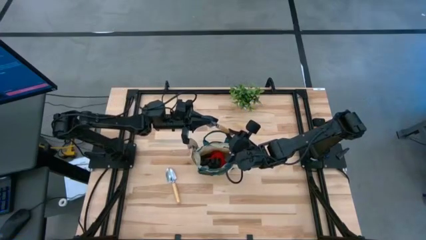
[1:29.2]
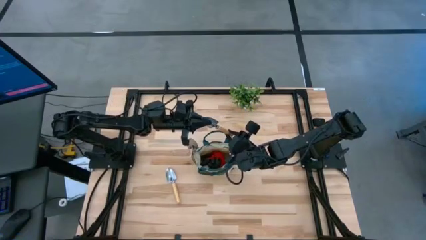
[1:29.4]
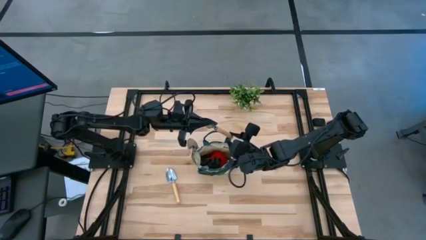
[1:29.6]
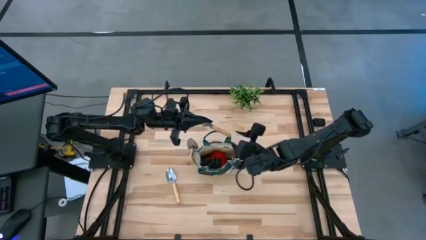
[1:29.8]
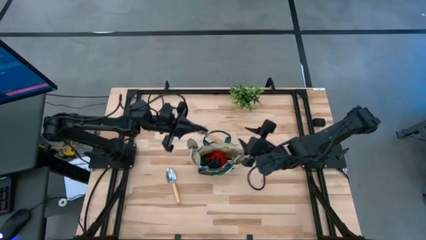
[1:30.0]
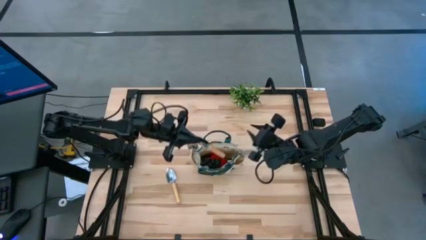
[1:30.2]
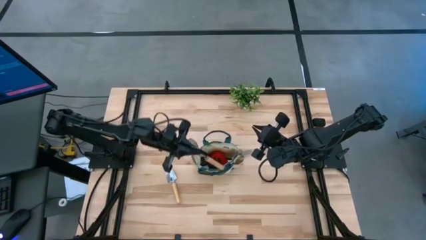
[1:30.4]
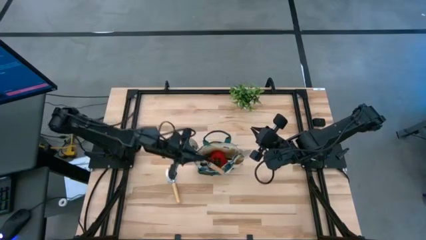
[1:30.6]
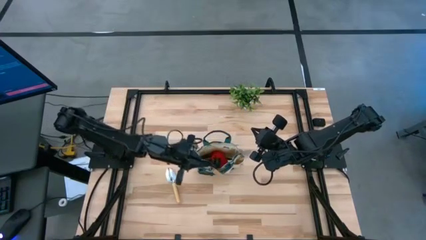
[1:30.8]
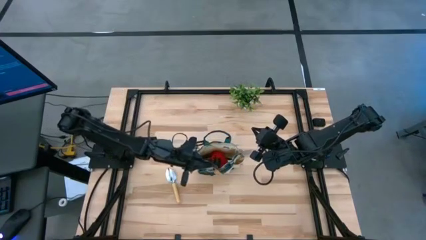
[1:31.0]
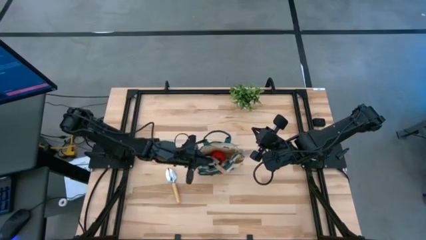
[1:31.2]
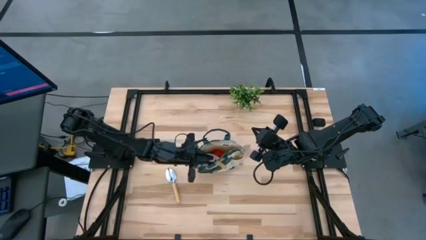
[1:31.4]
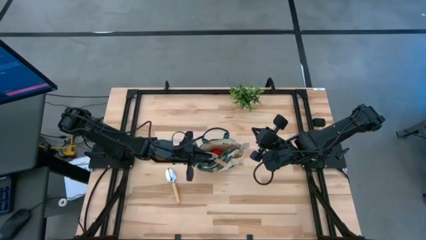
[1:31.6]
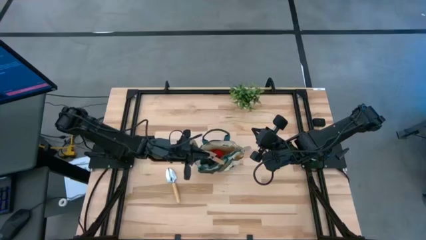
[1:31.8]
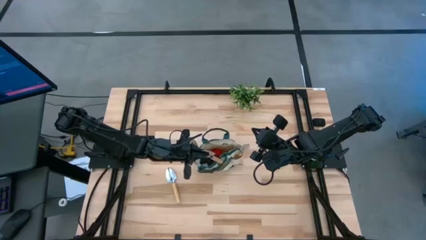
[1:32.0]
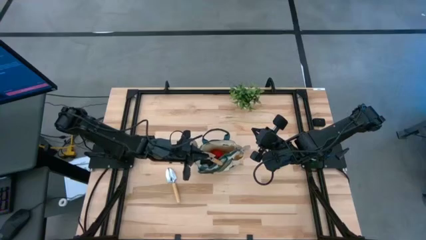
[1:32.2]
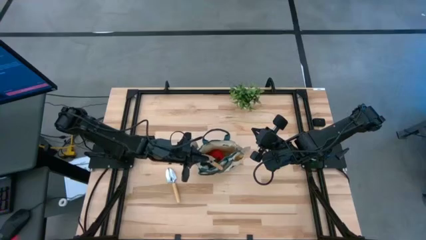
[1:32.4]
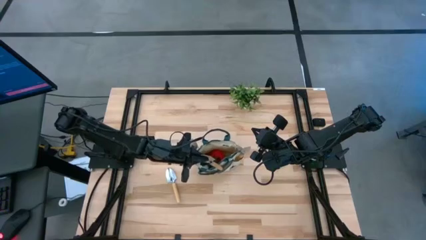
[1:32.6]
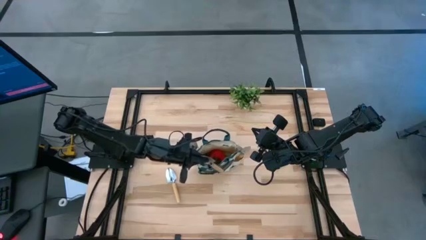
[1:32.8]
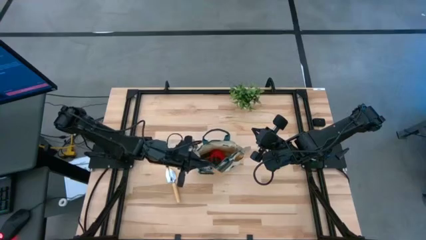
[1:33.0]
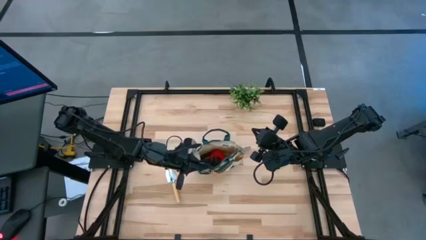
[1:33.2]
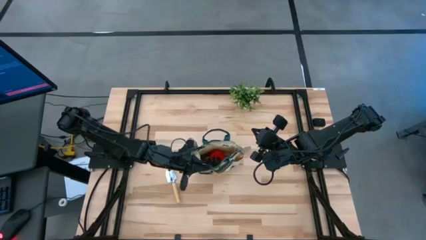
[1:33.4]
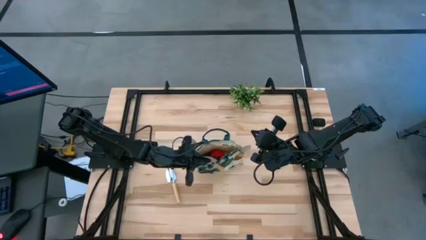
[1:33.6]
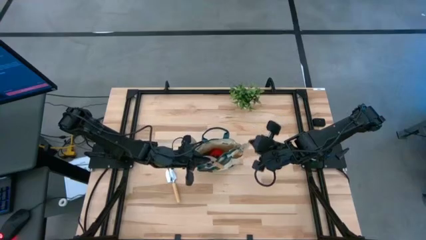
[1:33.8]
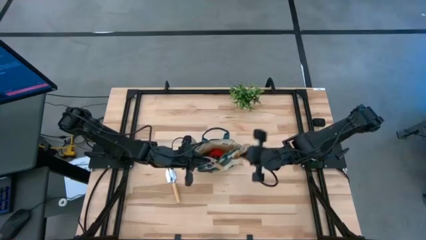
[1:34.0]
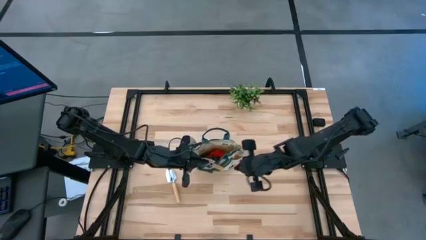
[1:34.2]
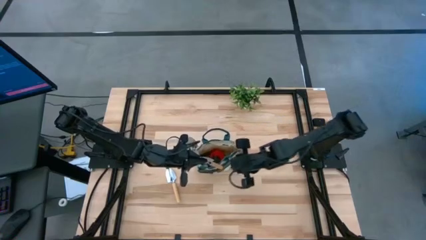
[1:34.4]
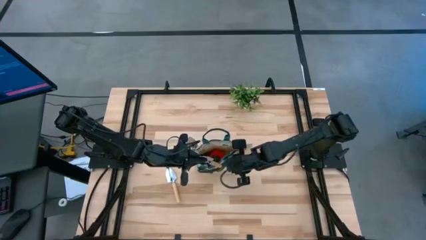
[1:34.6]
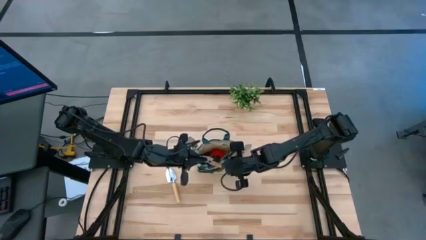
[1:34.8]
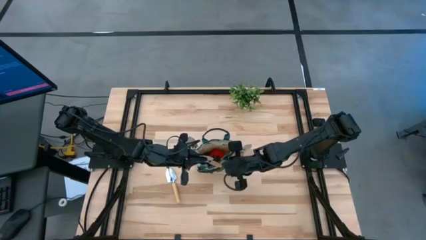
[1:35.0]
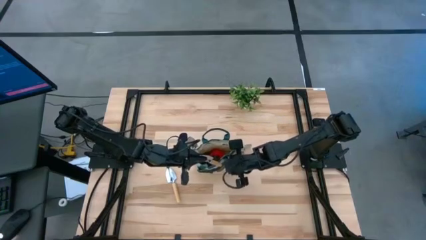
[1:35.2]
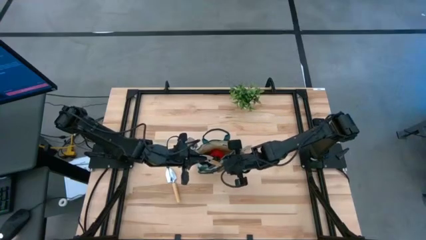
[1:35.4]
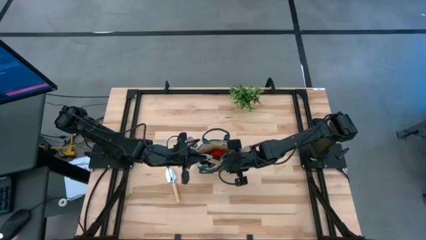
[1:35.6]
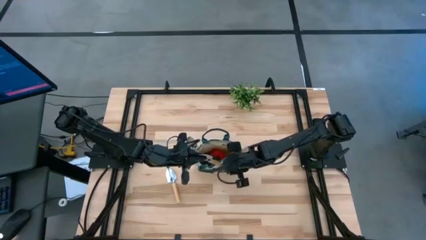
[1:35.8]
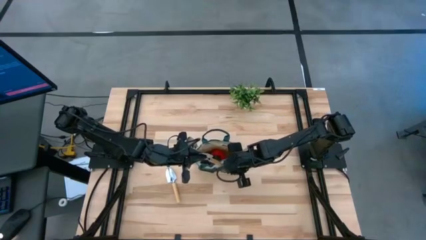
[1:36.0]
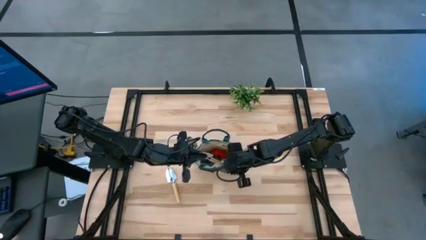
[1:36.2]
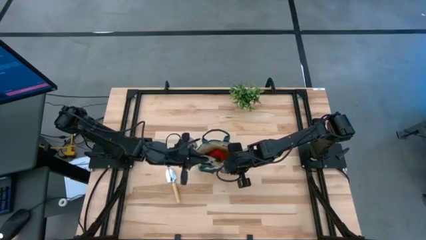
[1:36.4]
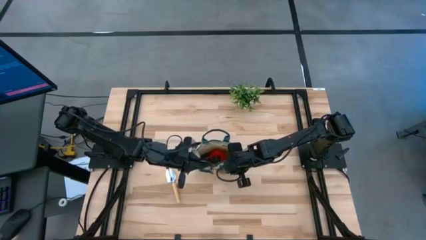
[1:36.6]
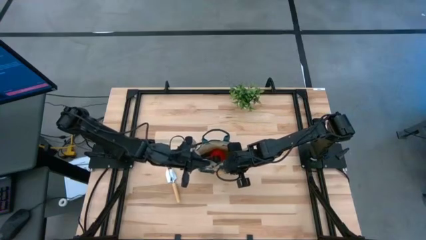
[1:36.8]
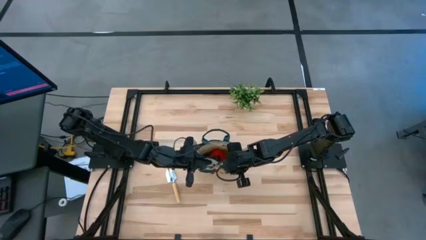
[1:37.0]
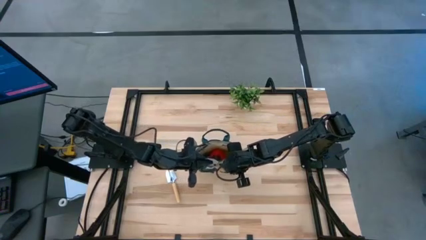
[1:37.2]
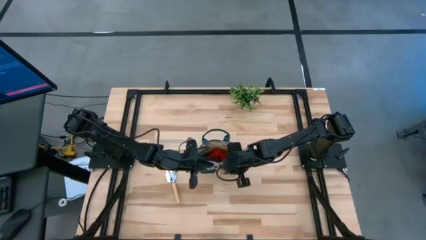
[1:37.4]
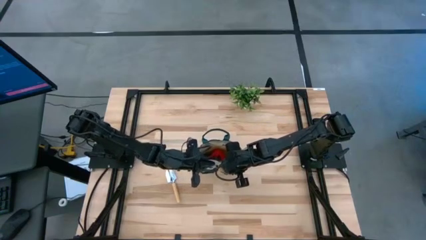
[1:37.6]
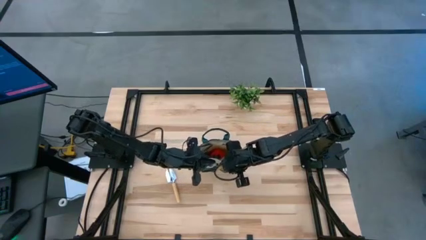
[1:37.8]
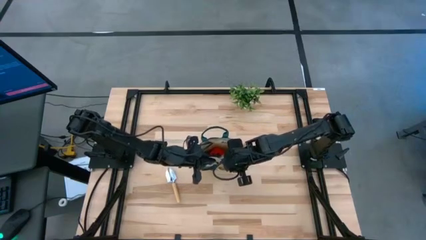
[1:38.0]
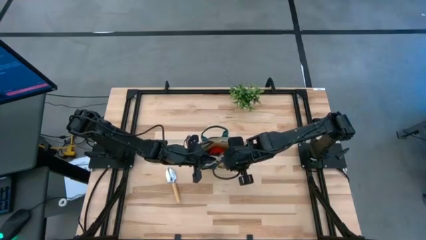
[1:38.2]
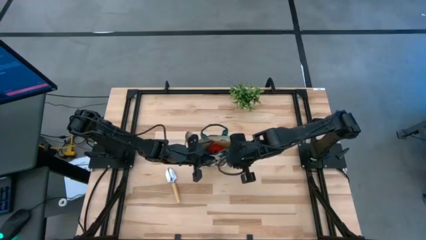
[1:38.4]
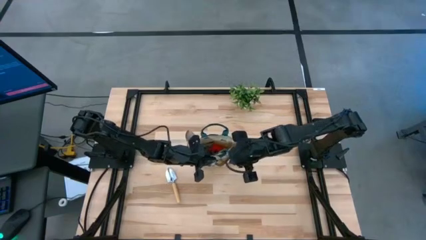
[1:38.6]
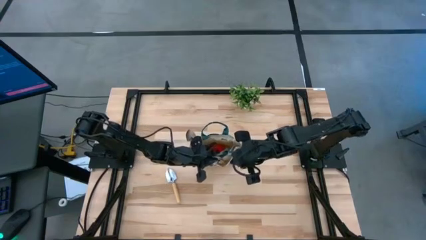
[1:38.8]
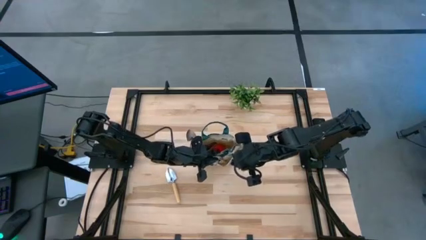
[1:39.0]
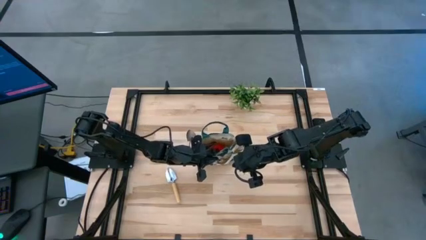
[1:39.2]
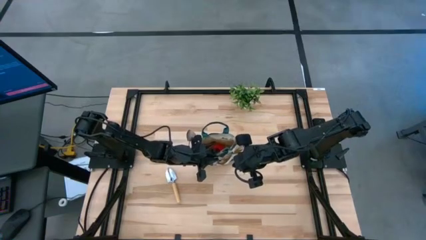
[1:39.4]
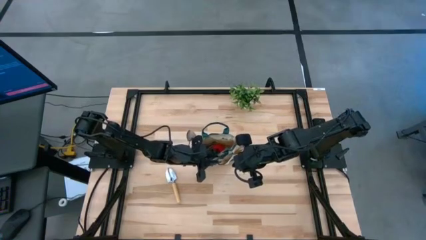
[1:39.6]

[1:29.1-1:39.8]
Task: Pick & Place Garden tools in Gardening bag
Put the brown trowel into the gardening bag

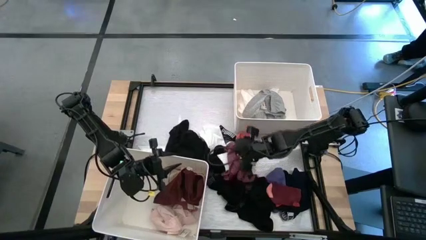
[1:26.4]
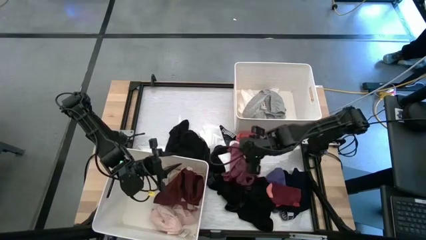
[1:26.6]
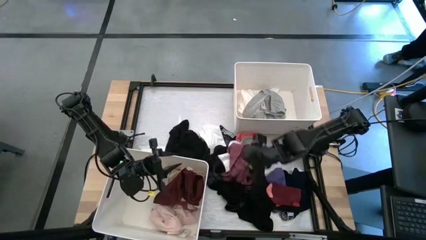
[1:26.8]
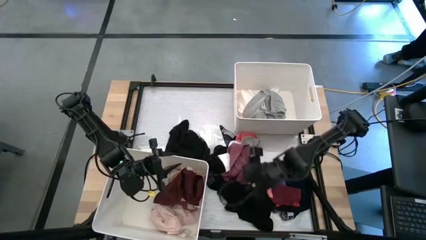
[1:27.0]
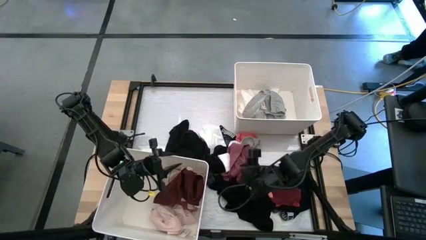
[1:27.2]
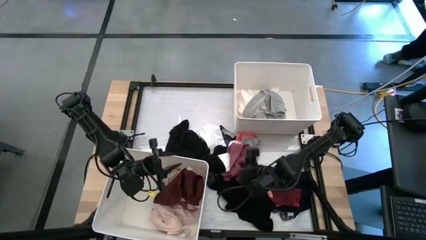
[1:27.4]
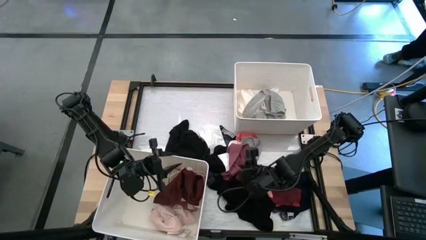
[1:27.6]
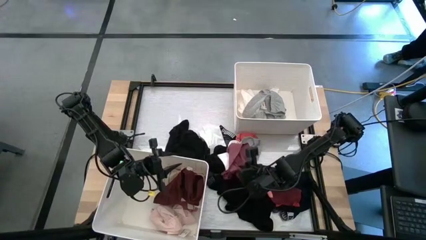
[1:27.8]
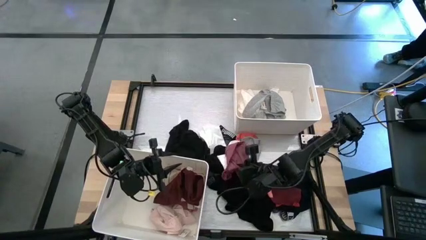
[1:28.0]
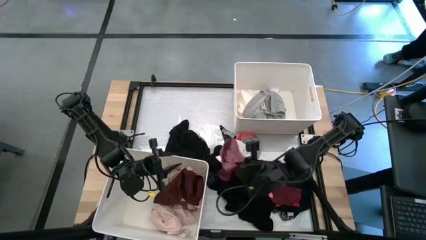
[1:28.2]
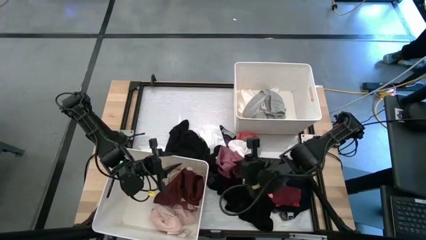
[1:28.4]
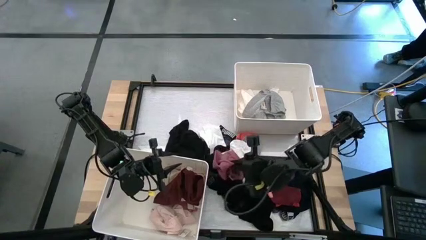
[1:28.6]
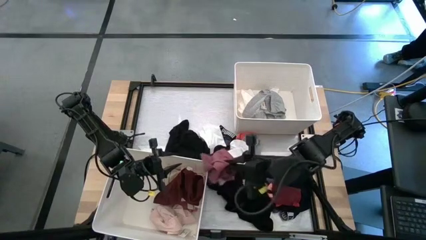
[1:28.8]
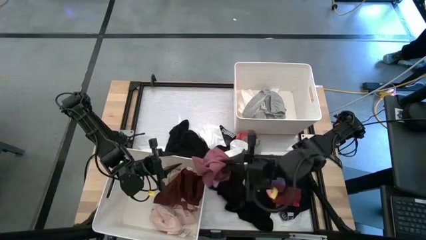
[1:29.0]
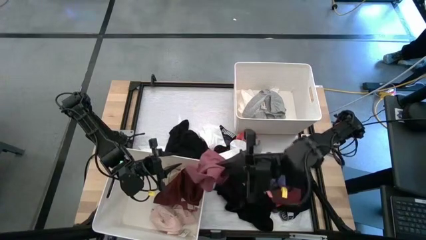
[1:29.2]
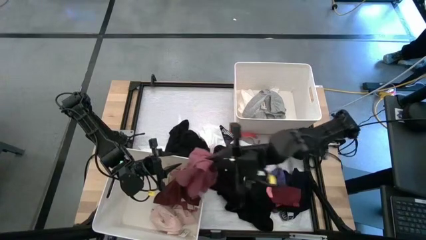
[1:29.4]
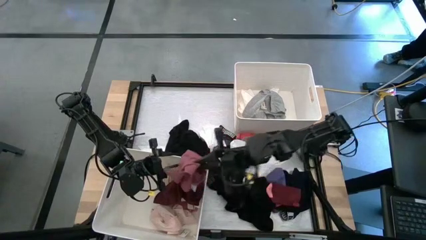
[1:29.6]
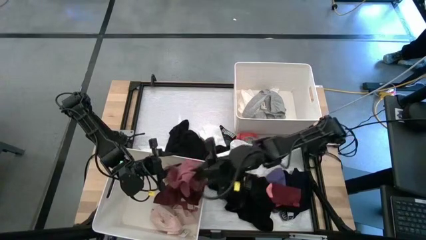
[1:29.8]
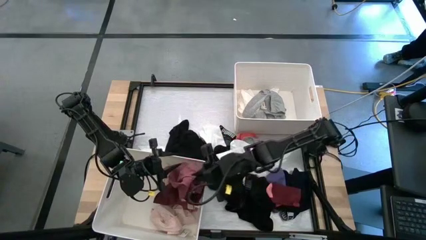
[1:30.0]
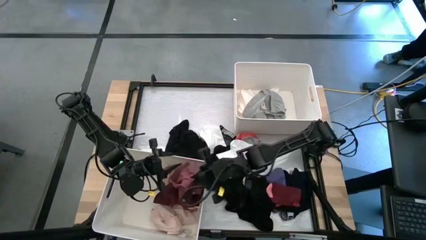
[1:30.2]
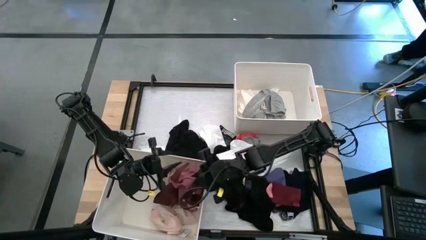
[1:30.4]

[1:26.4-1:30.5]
Task: Sort clothes
Put the maroon boxer into the bottom white bin
